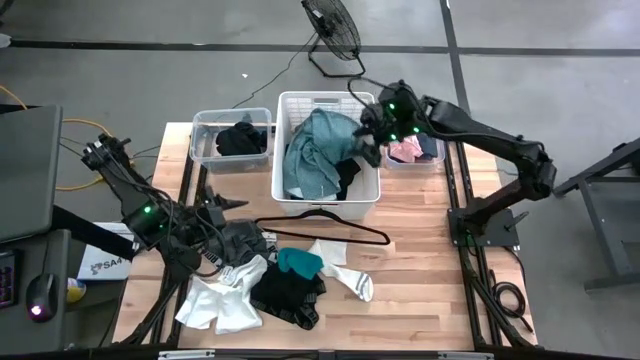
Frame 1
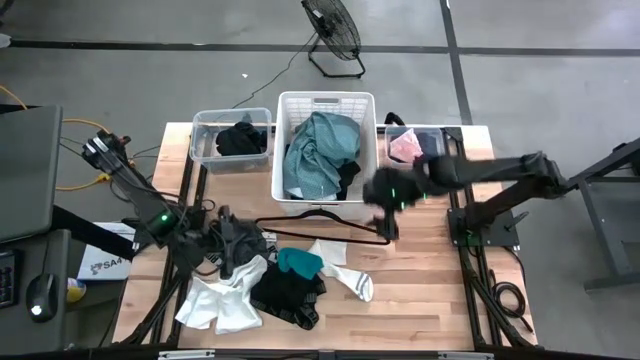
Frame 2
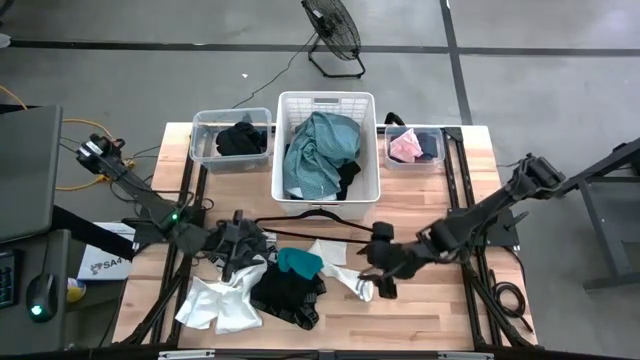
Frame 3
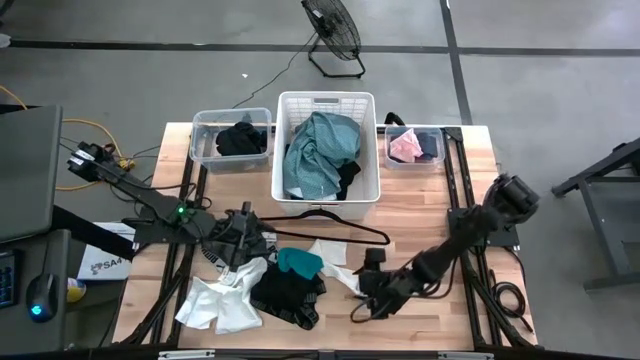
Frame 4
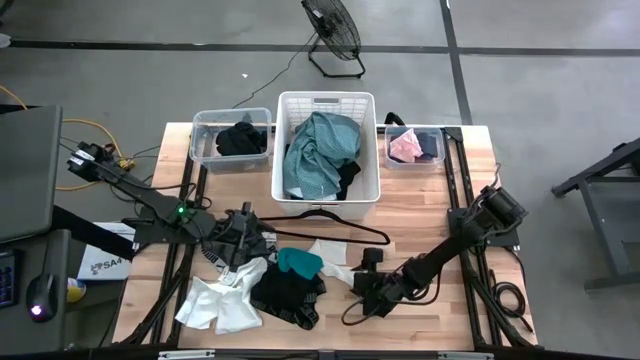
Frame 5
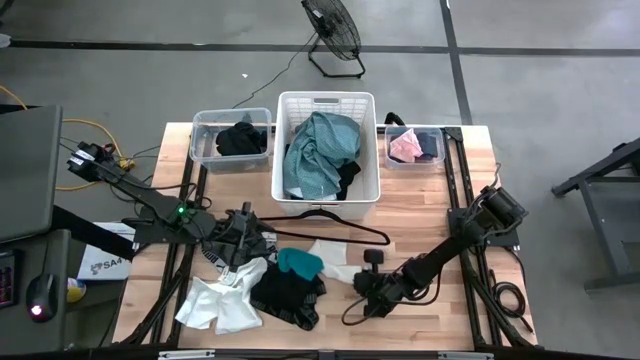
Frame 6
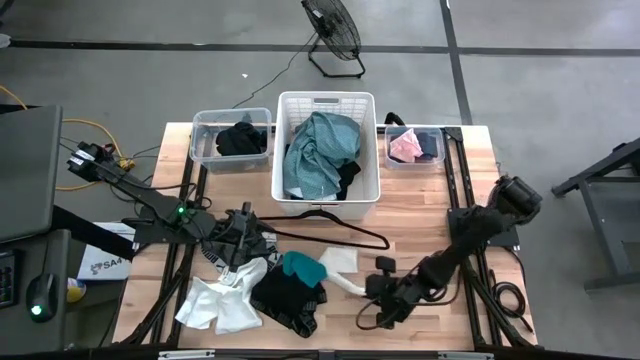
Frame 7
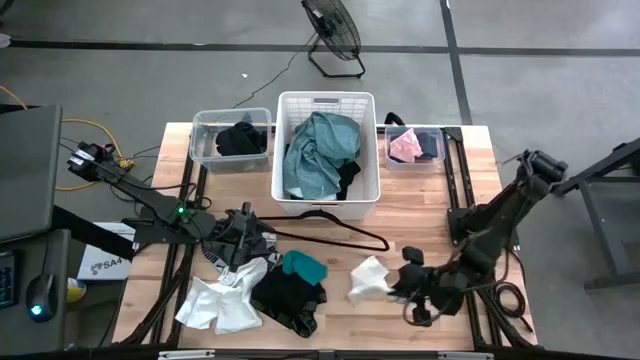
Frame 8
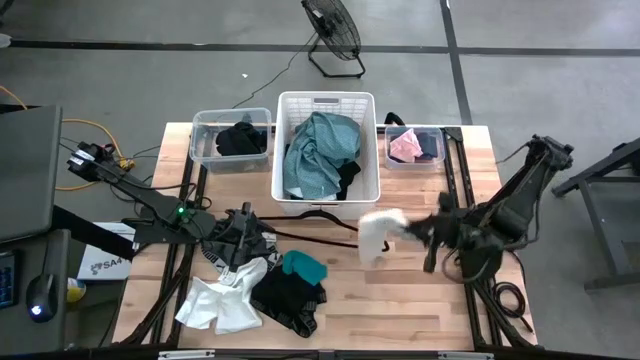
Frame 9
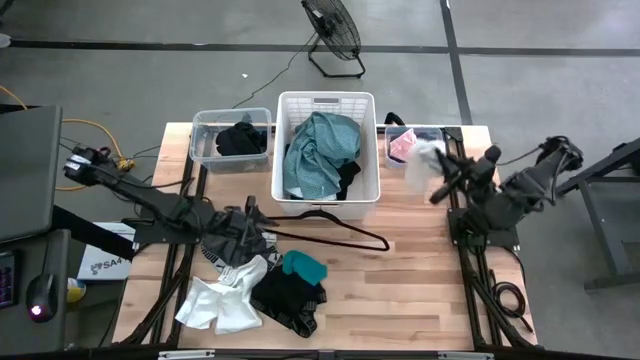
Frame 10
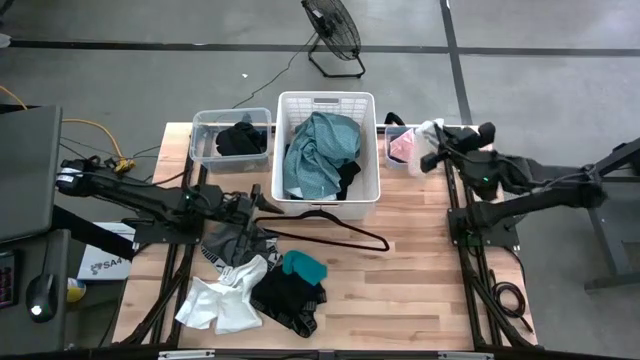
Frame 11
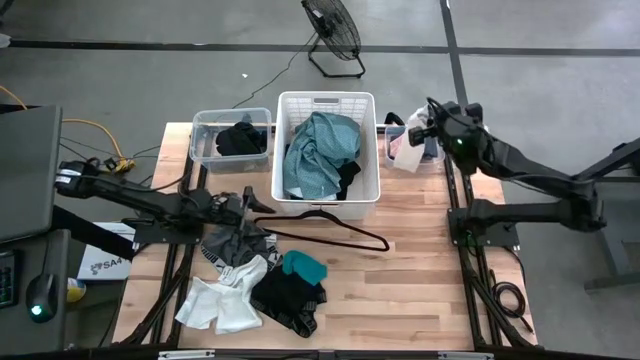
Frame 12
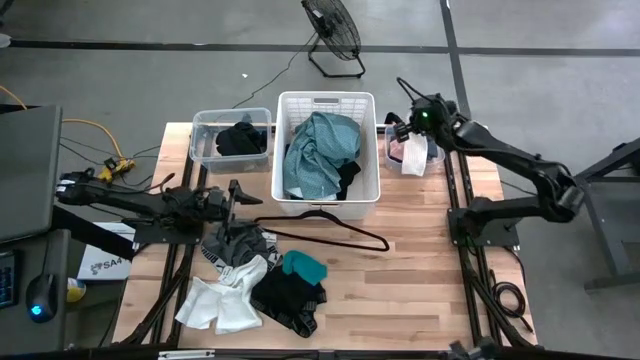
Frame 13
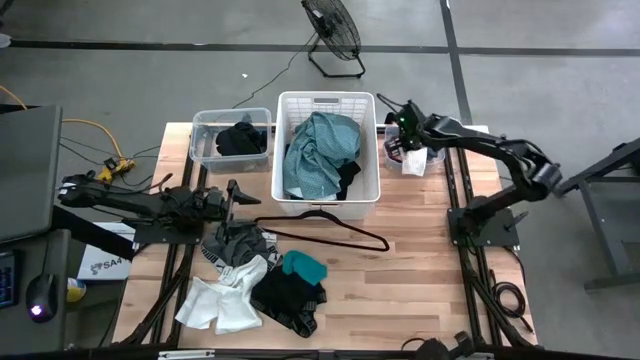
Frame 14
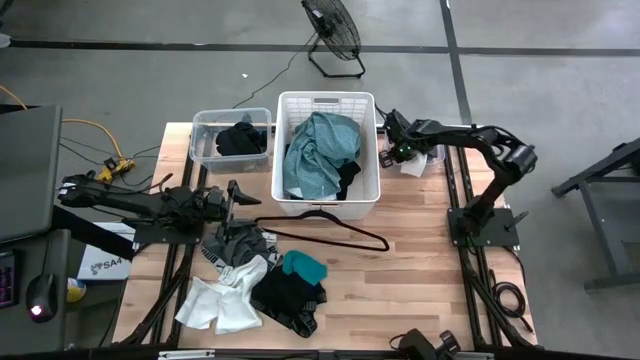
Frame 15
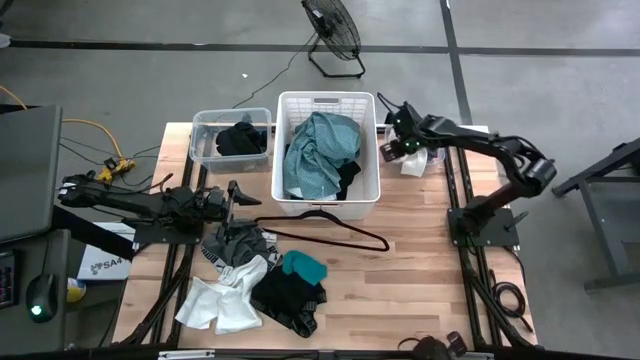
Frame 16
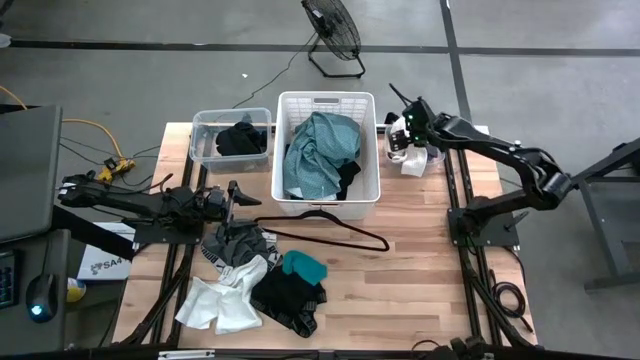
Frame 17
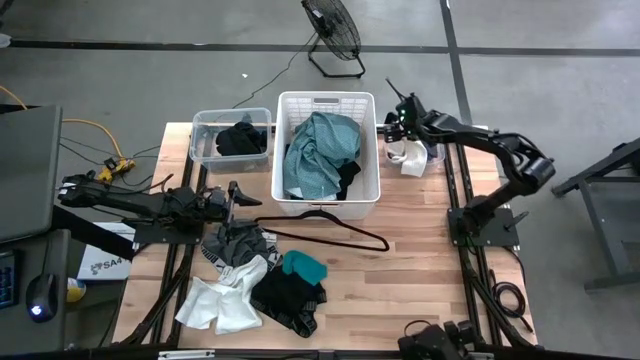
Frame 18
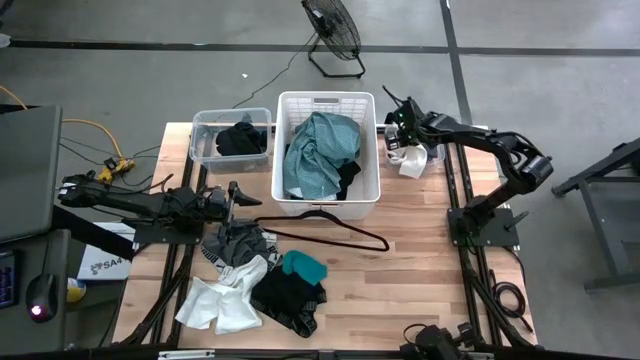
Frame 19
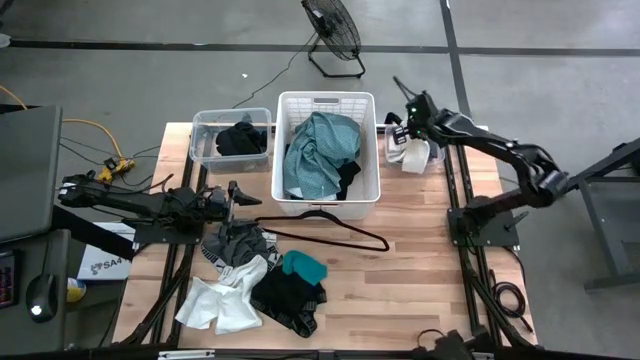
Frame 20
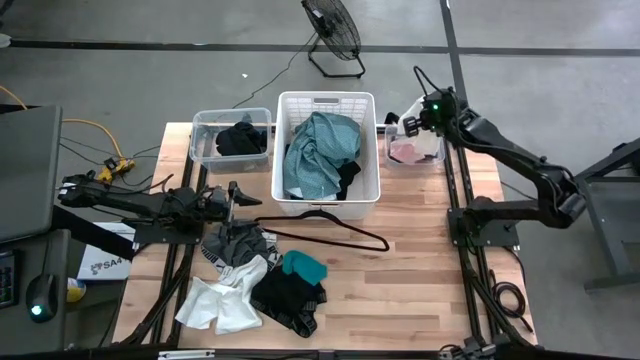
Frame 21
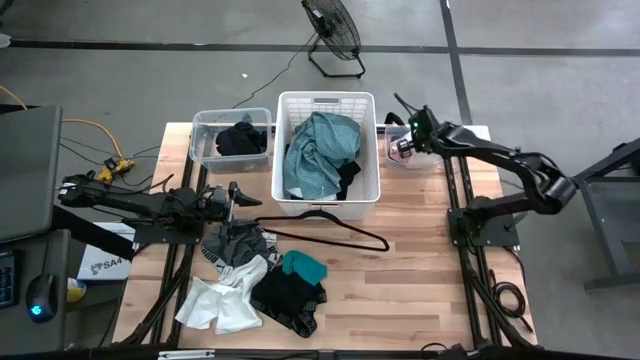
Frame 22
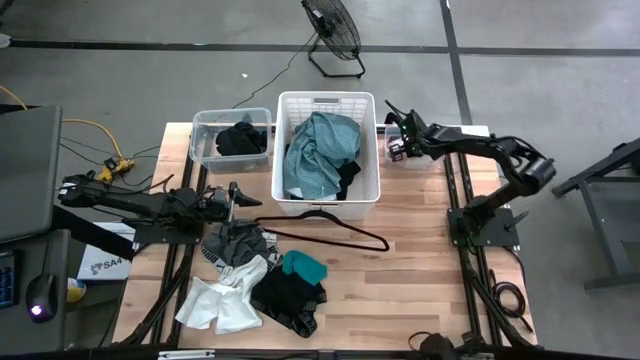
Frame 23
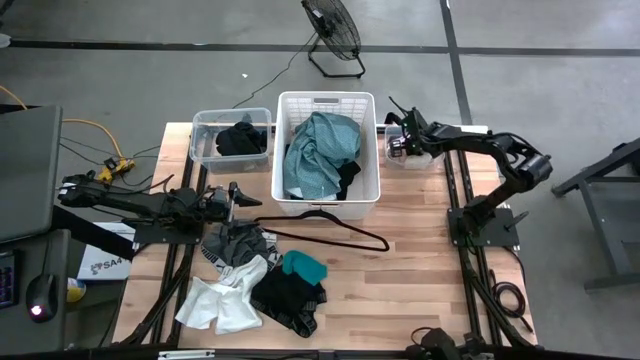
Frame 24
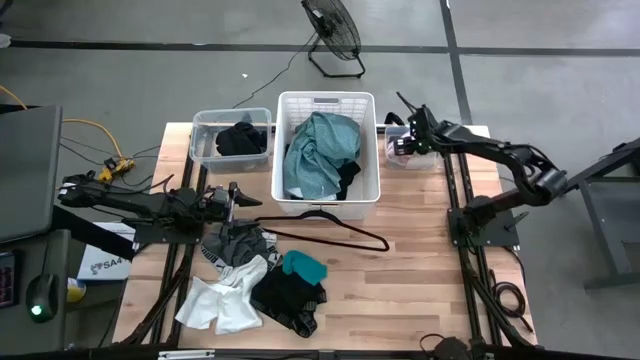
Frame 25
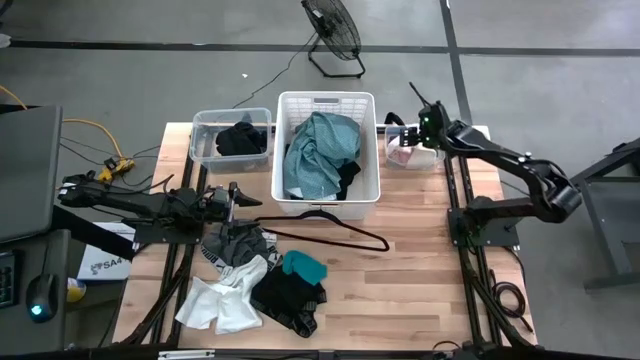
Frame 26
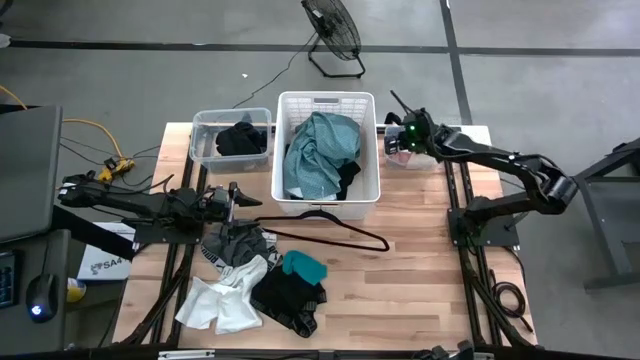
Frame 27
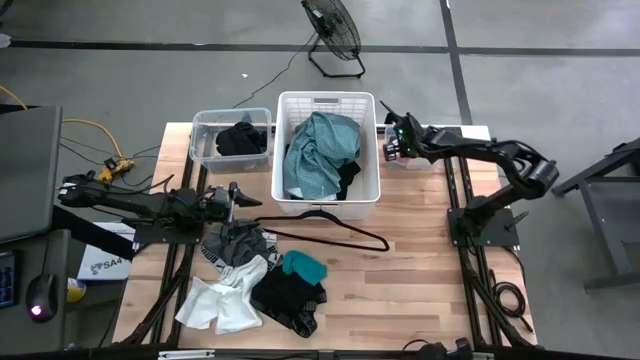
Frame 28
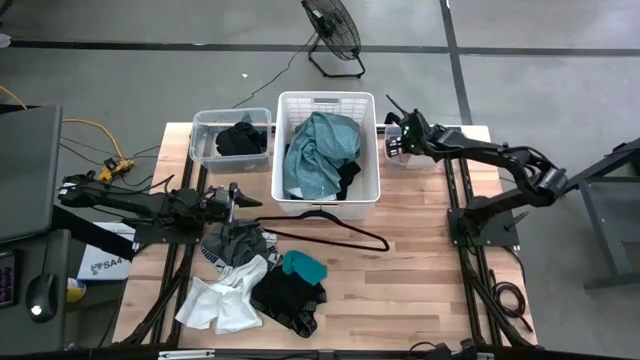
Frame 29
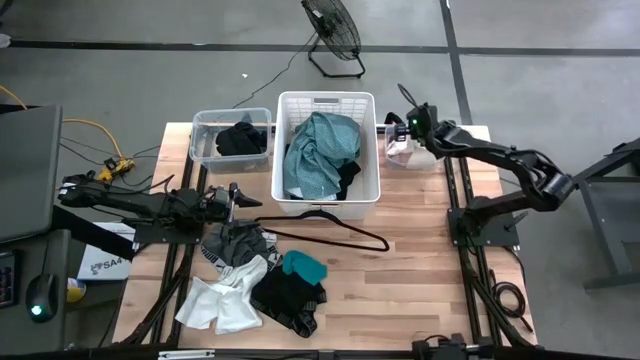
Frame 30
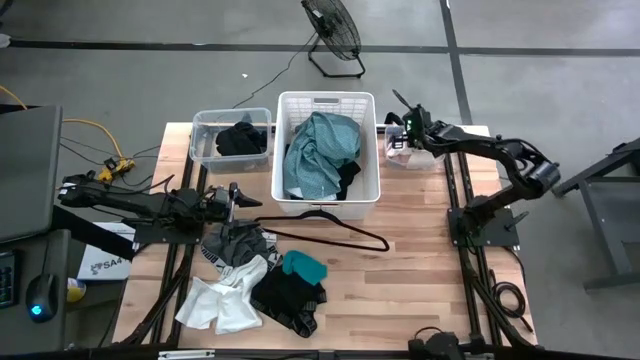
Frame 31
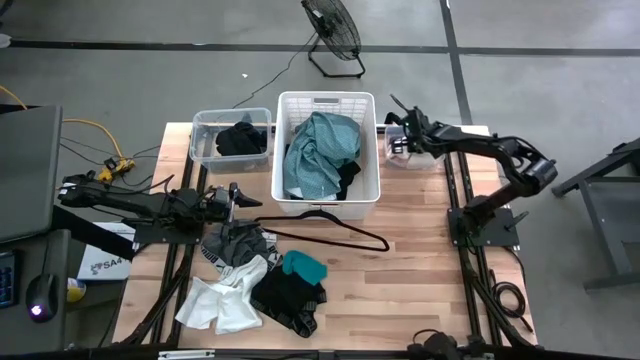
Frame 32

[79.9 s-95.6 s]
Task: Pick & Place Cloths
Put the white sock into the right transparent bin

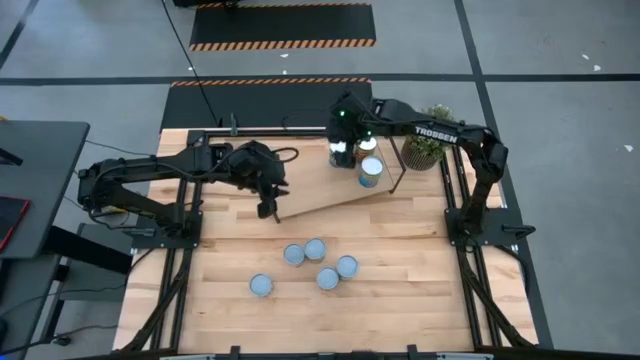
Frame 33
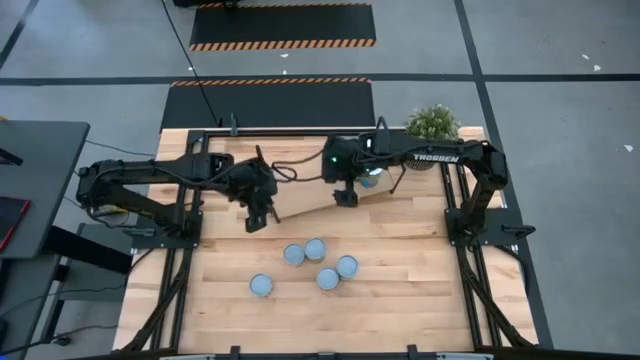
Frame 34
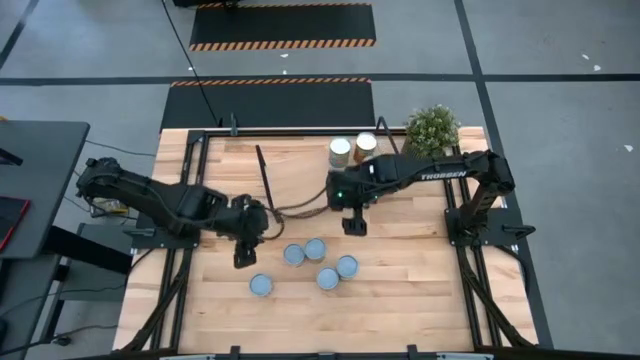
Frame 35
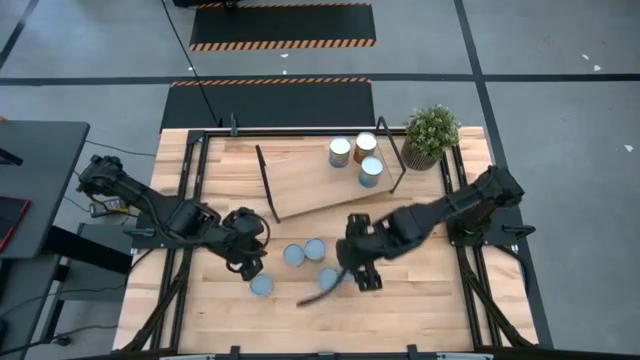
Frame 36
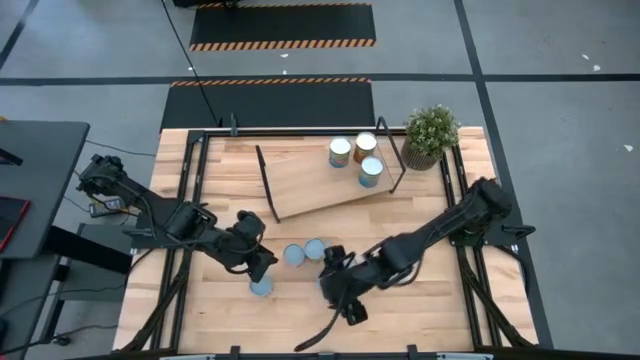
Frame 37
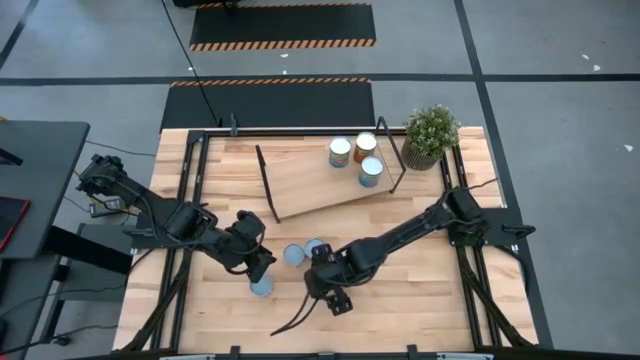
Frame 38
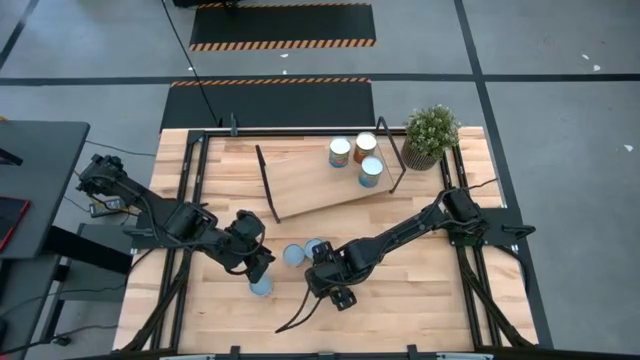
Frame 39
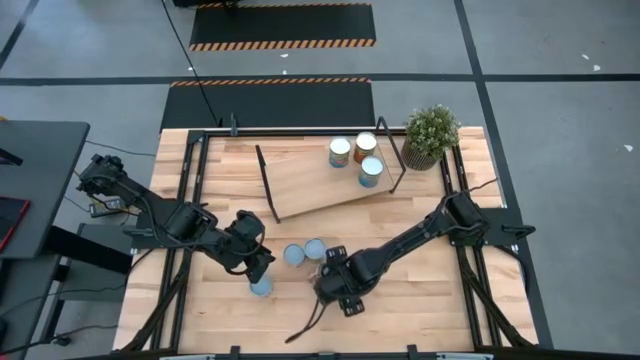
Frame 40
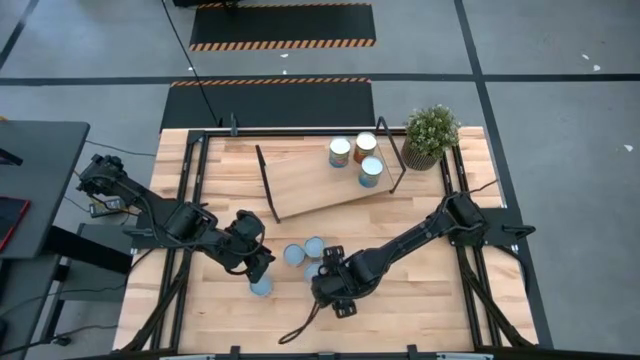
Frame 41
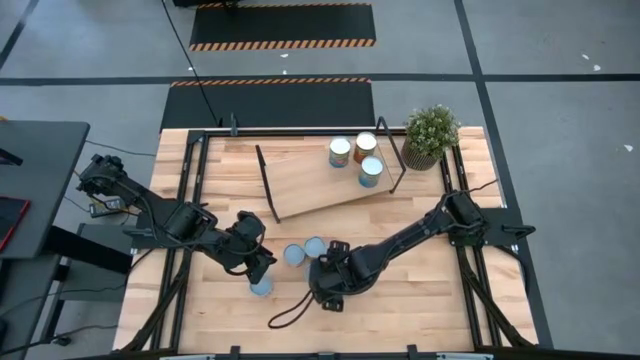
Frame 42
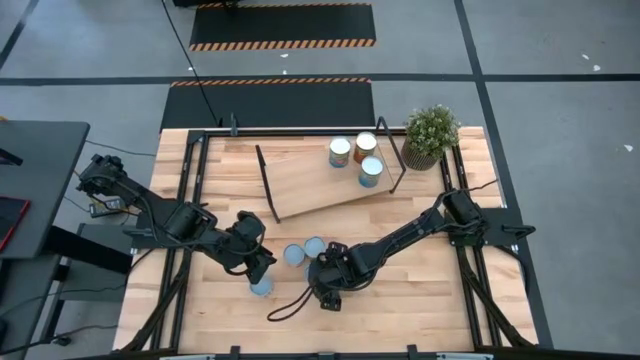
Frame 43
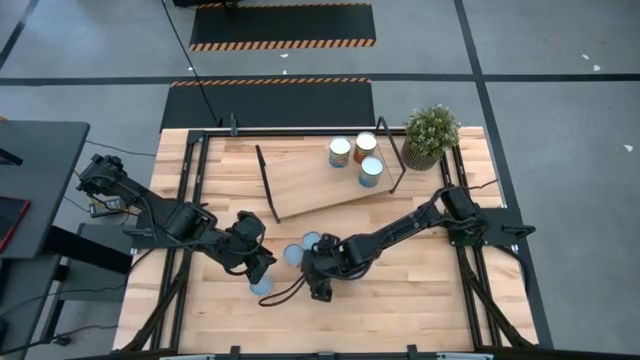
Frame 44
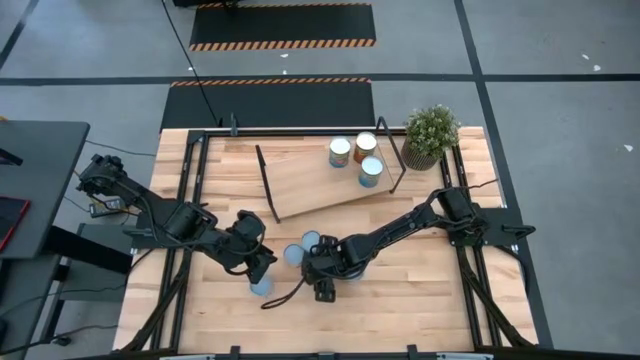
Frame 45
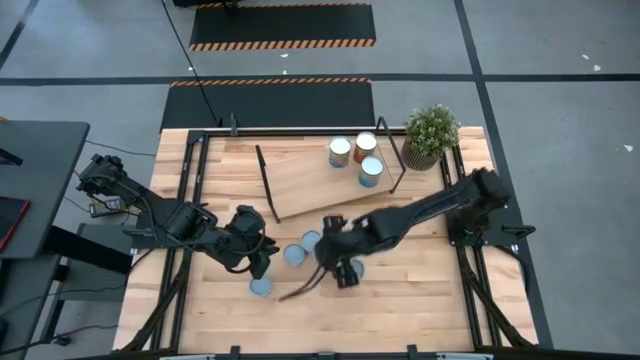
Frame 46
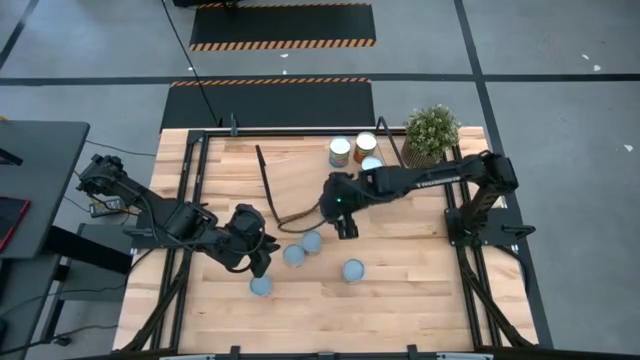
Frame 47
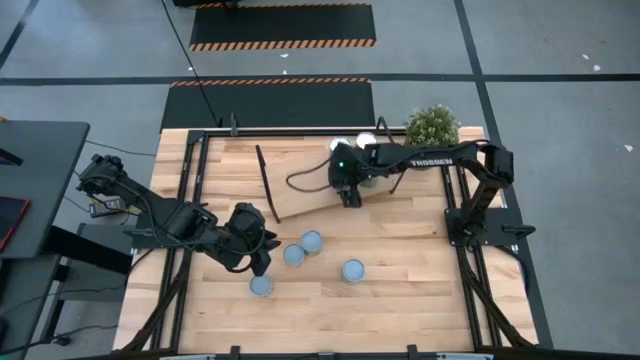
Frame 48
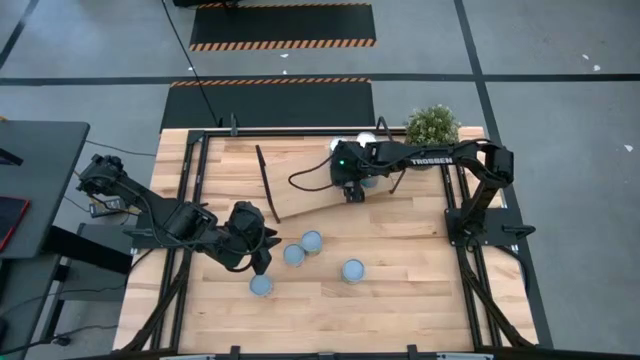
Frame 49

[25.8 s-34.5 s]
Task: Pick and place cans onto a shelf
Put the small canned tomatoes on the shelf
